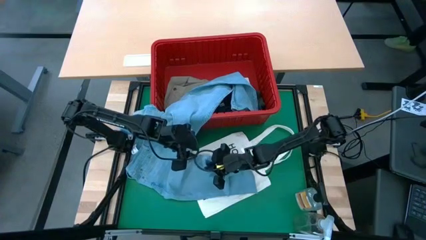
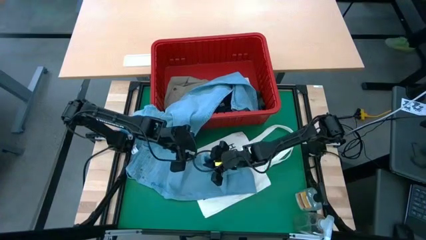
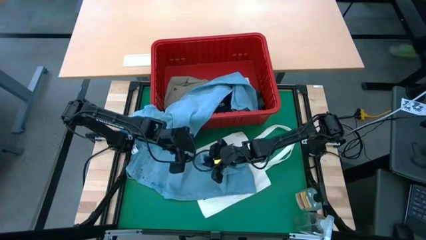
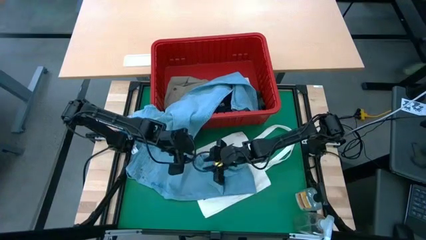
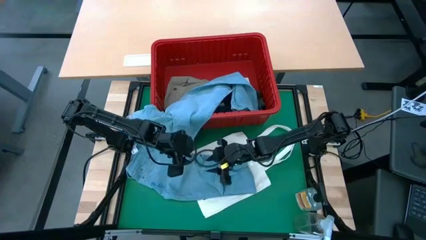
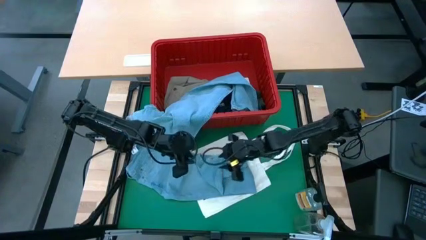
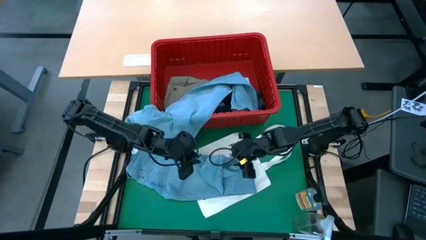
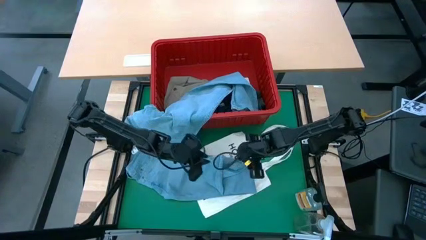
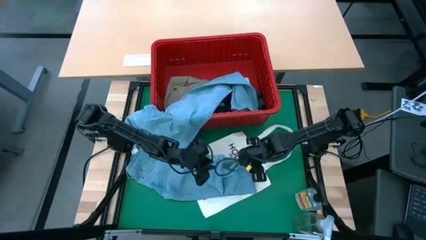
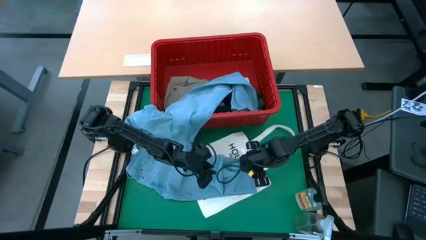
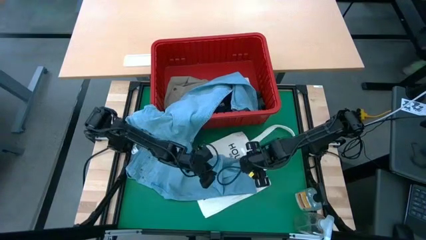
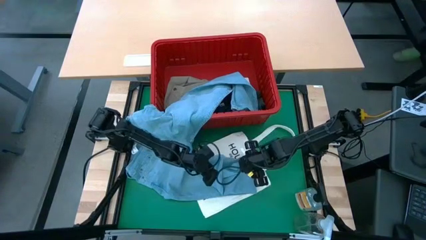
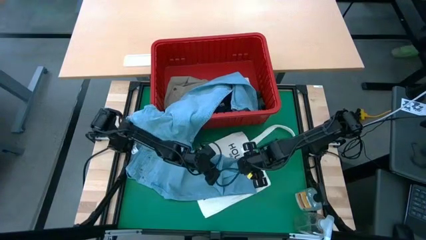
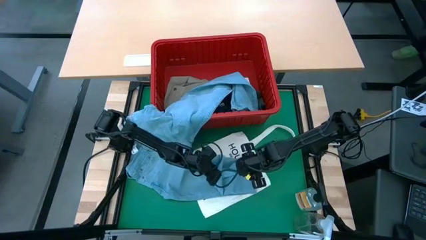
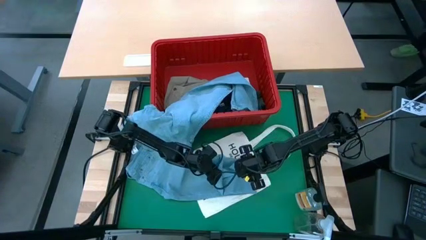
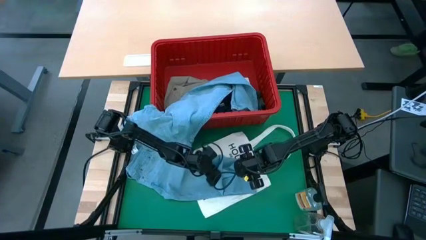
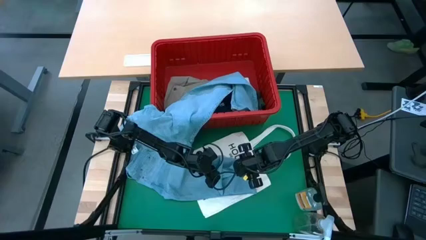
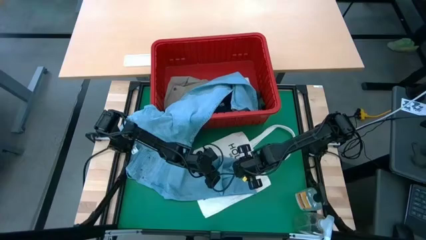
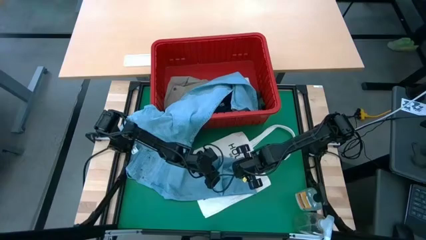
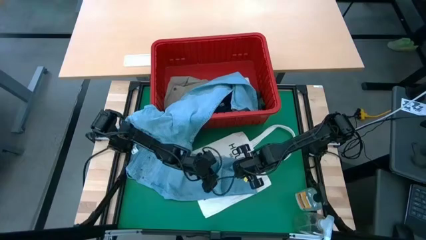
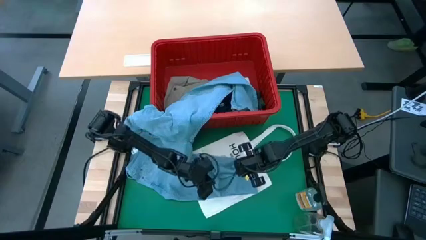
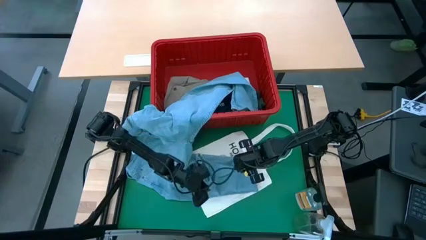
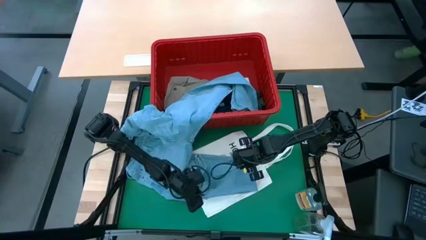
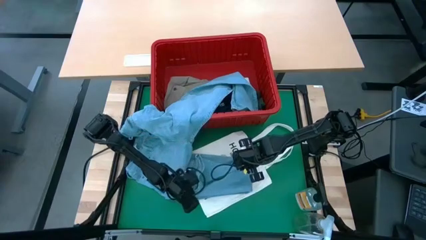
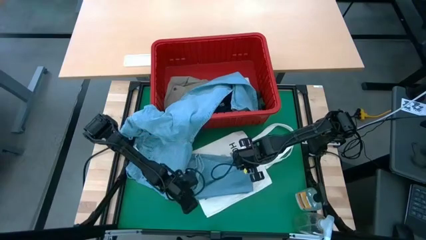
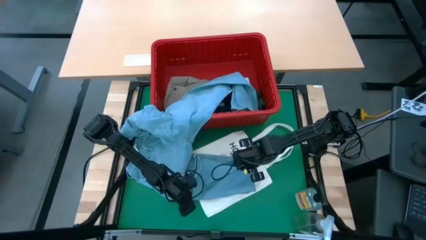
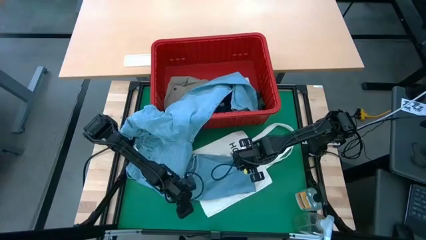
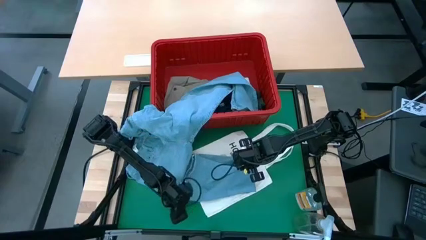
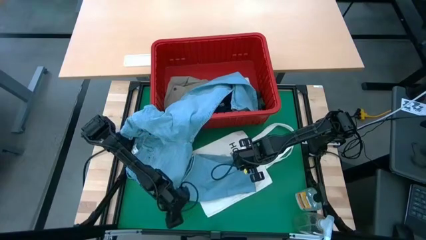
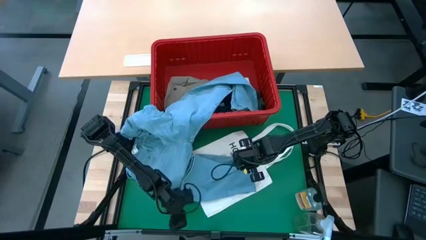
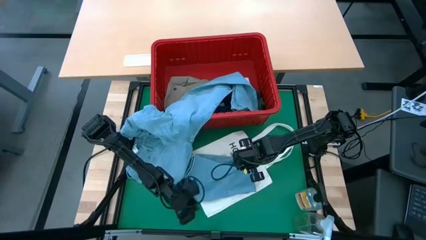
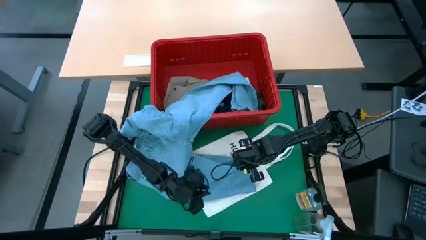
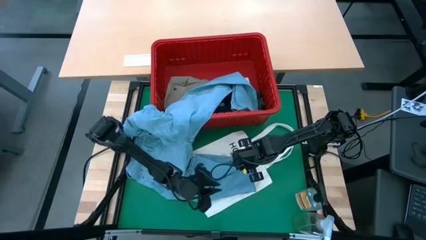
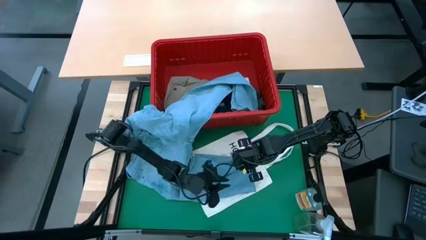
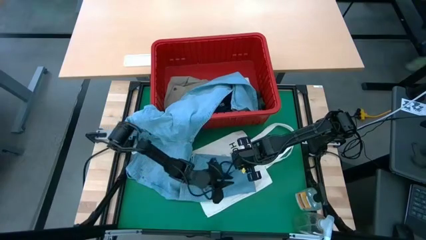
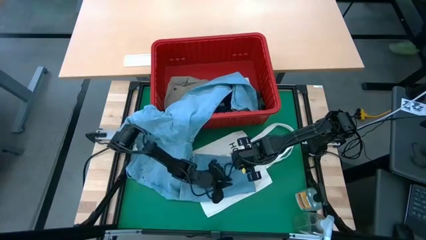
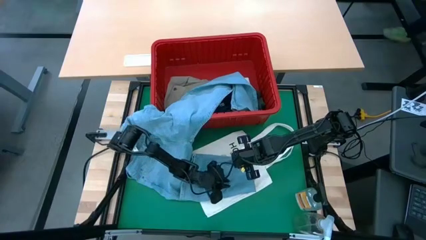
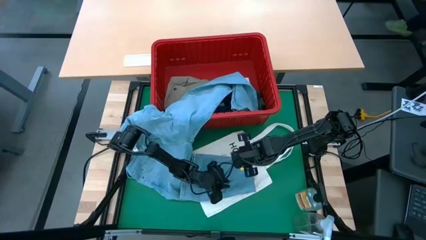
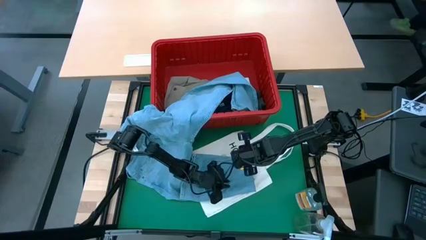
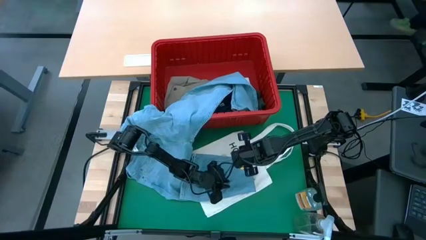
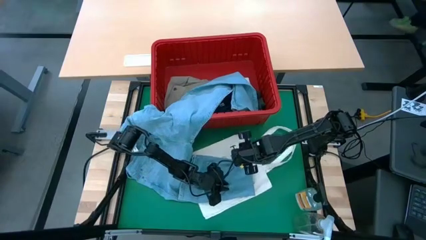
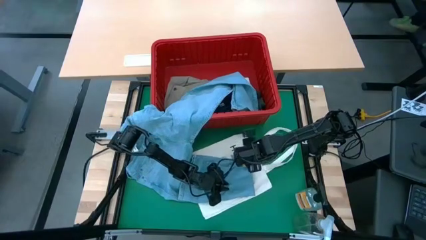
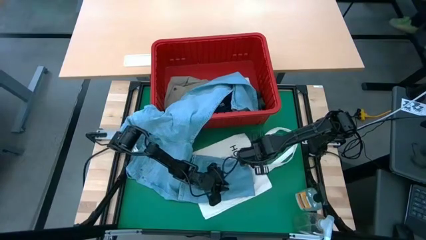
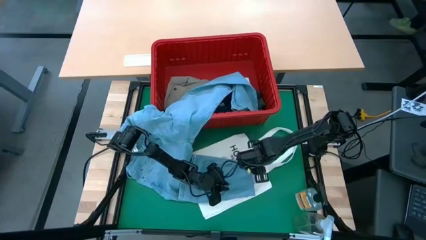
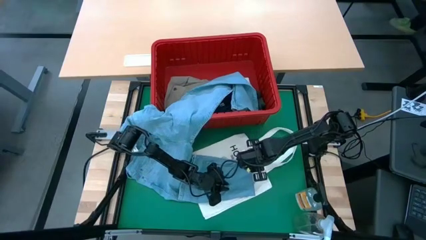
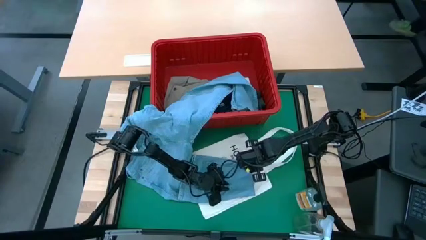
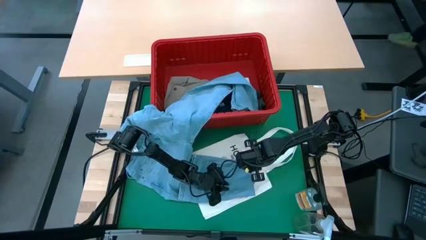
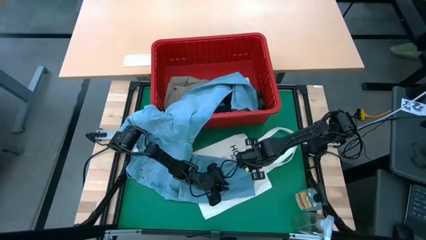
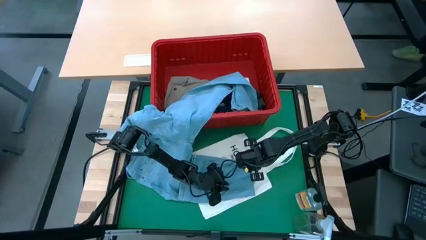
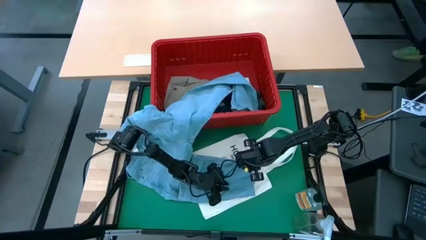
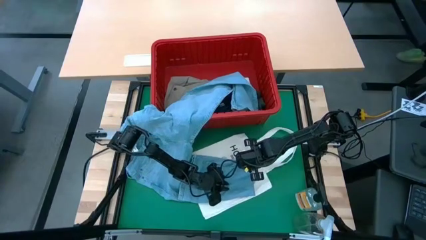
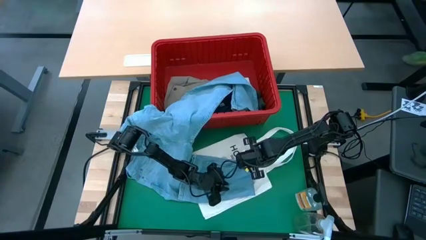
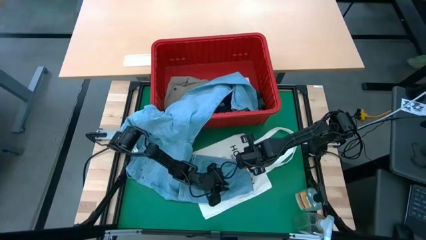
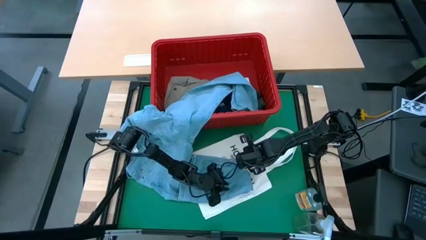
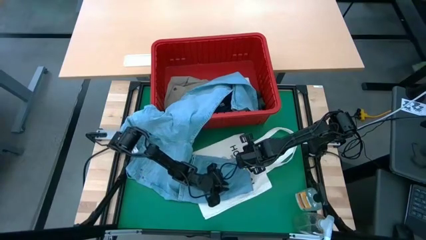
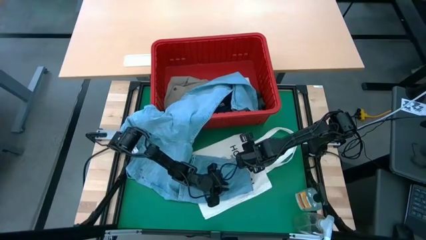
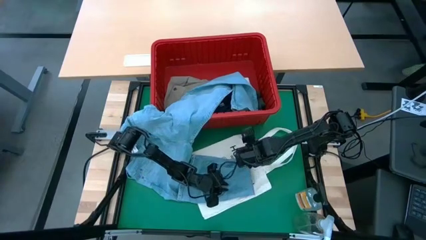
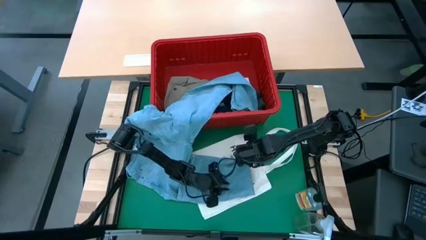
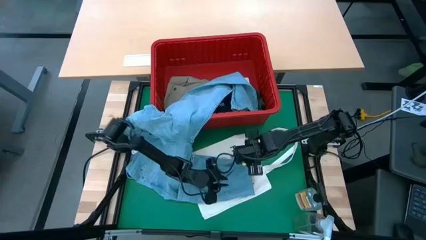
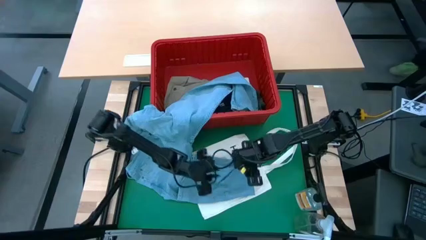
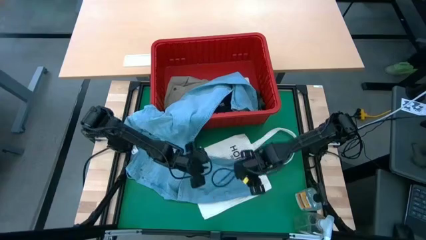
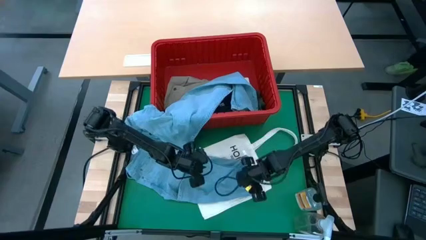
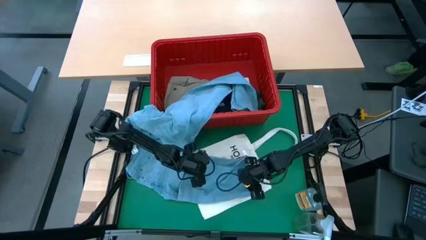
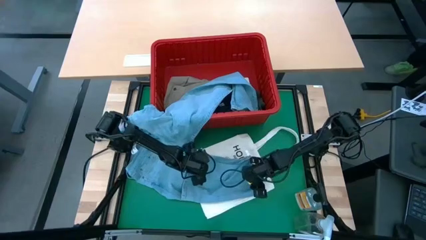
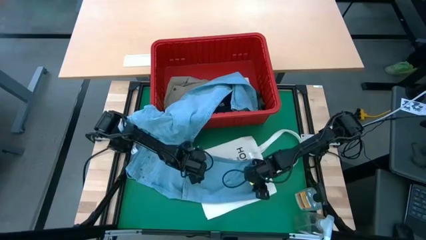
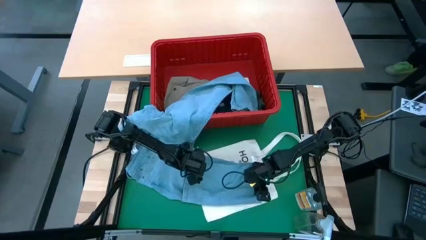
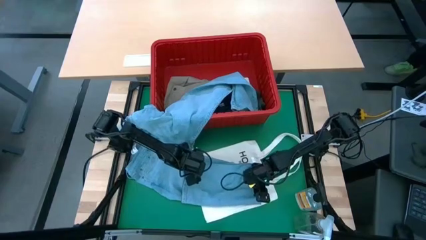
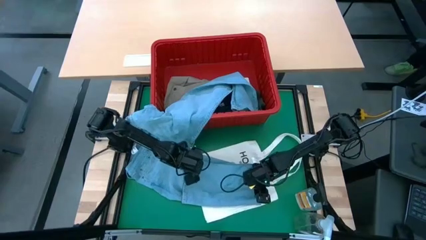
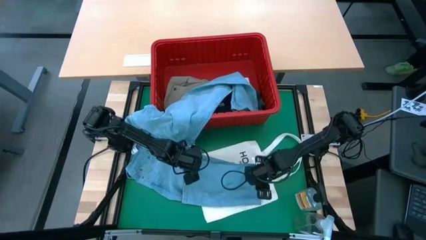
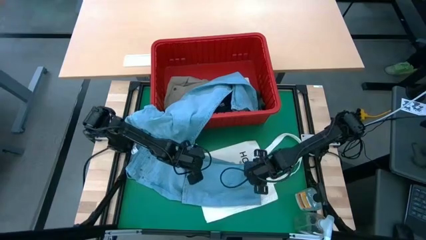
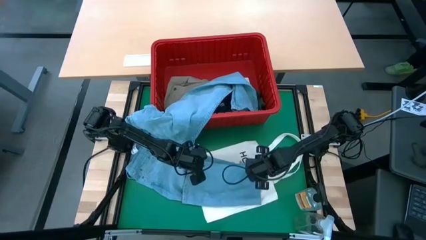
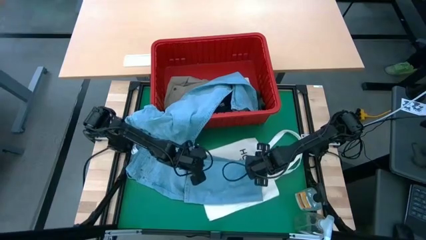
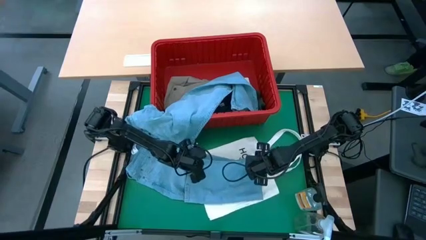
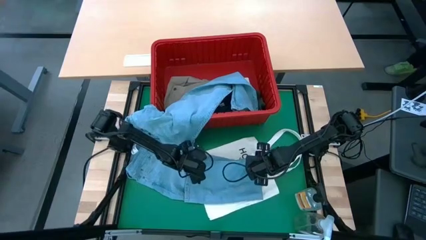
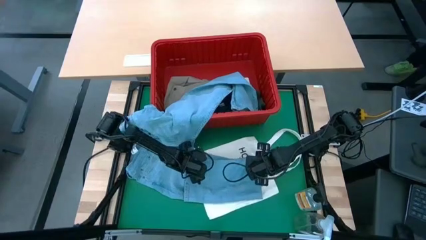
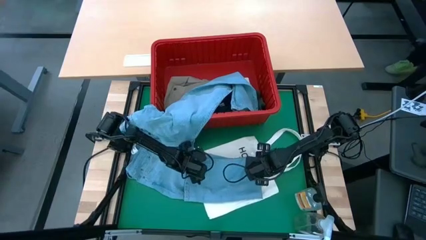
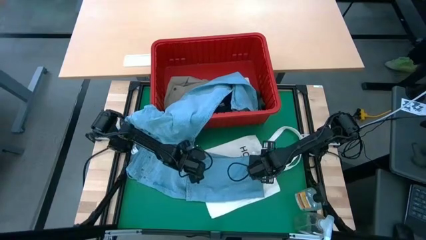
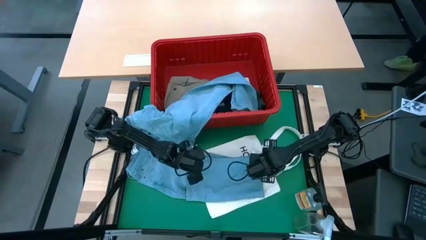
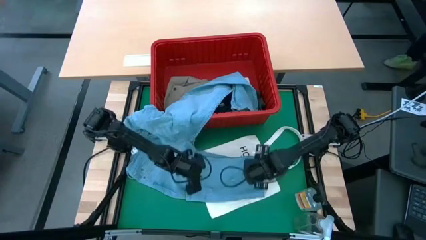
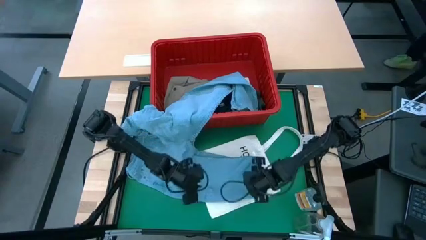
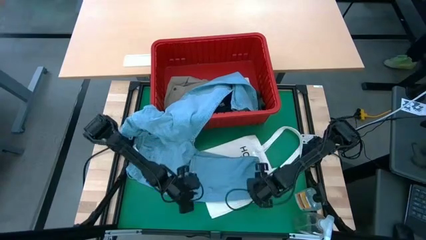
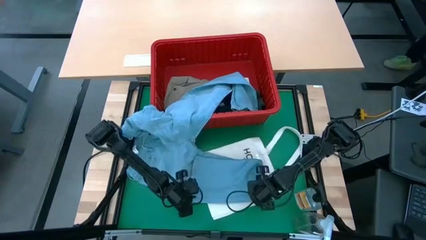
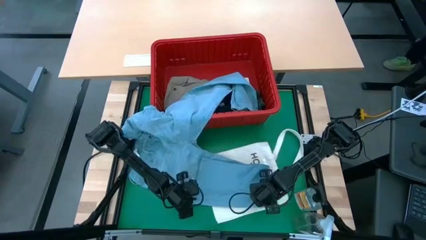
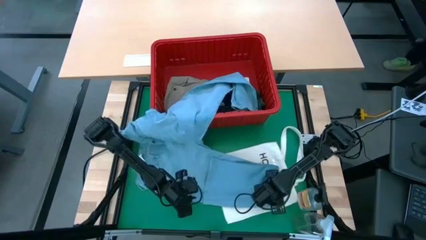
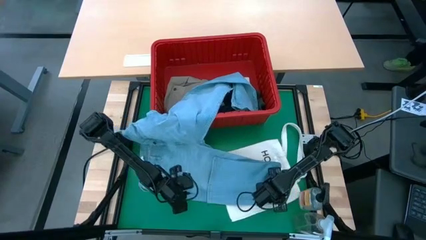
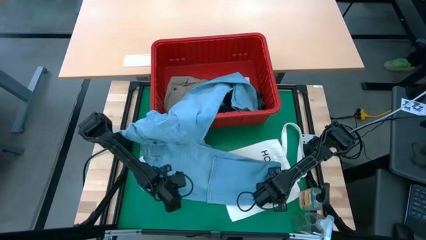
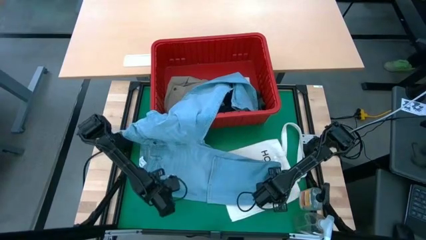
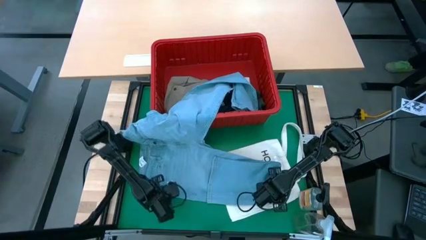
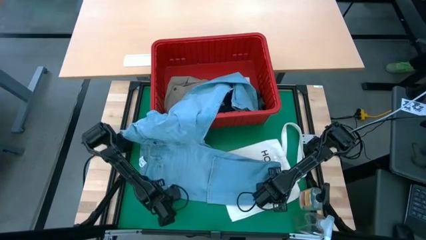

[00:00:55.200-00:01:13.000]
Task: Fold Laundry from Bin
Fold the blue jeans
